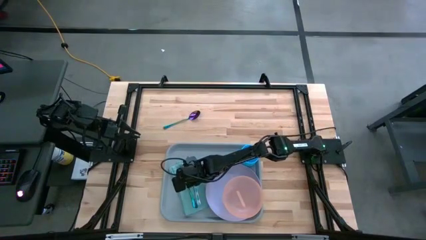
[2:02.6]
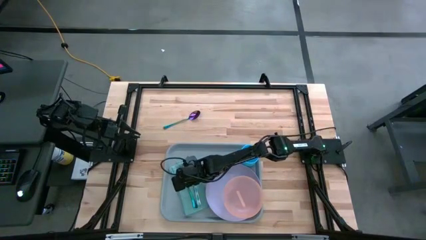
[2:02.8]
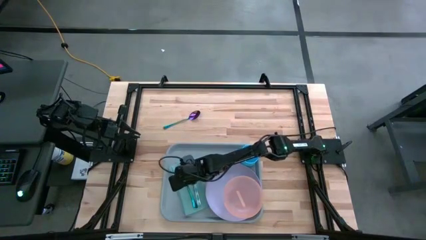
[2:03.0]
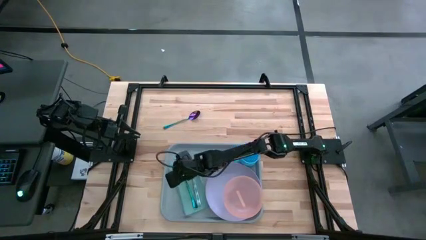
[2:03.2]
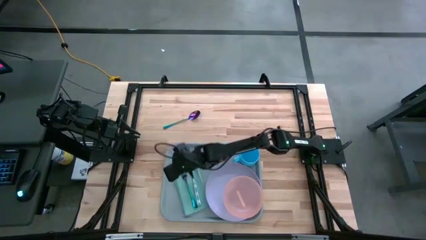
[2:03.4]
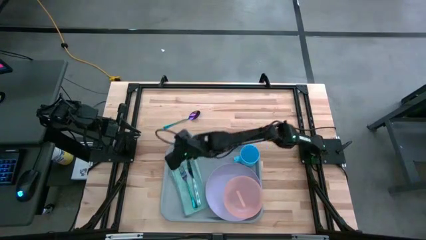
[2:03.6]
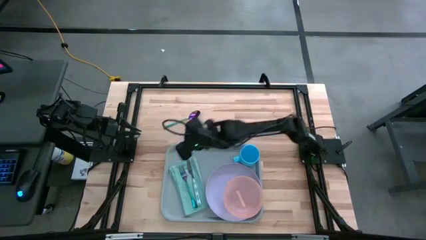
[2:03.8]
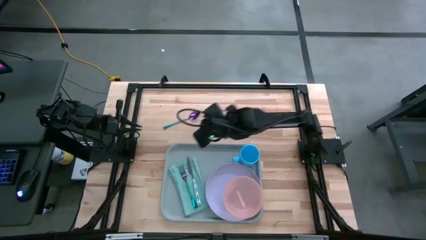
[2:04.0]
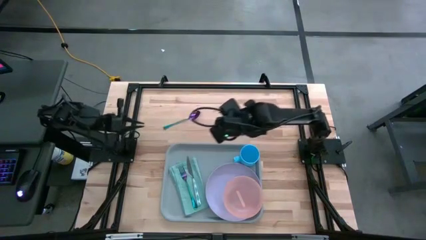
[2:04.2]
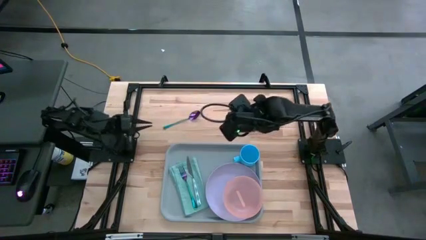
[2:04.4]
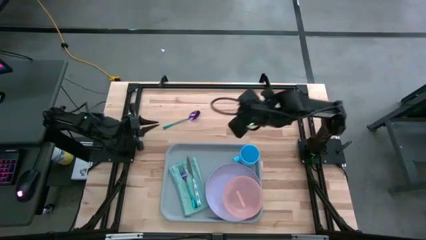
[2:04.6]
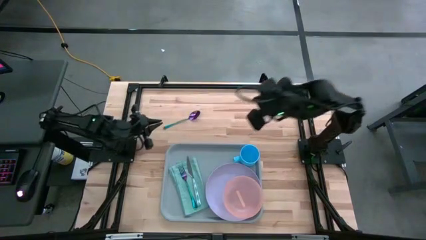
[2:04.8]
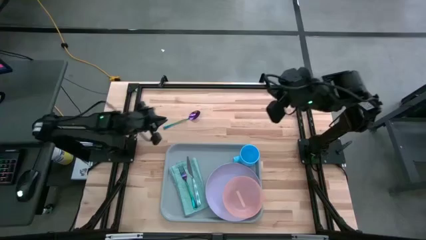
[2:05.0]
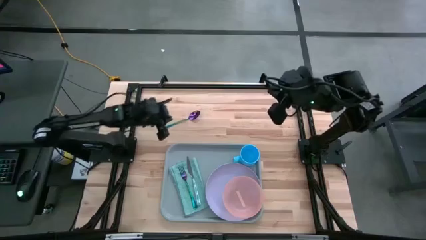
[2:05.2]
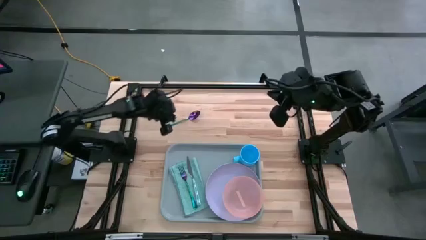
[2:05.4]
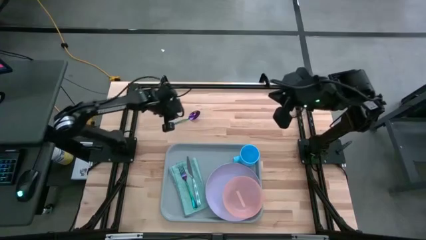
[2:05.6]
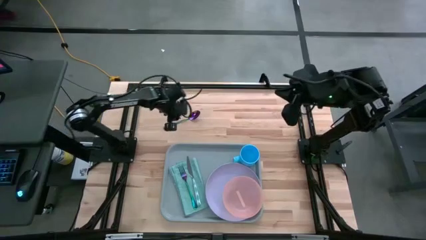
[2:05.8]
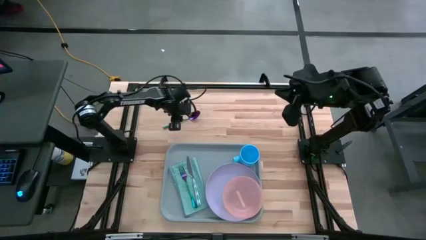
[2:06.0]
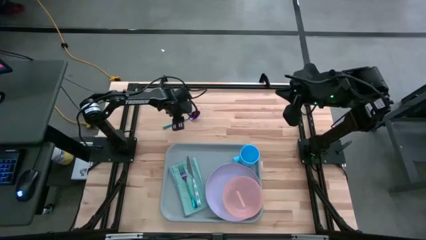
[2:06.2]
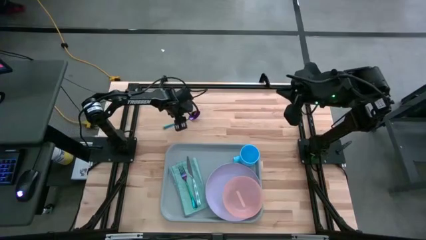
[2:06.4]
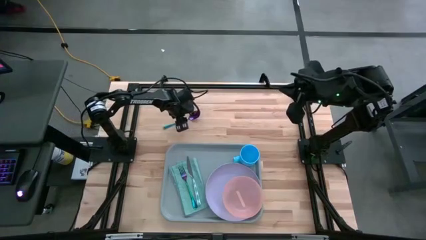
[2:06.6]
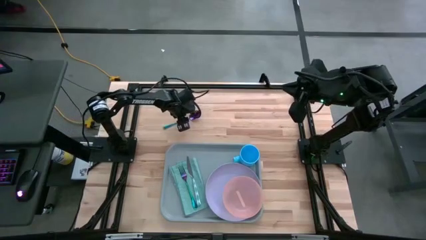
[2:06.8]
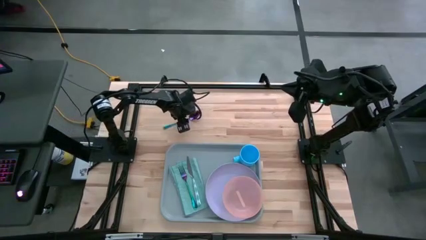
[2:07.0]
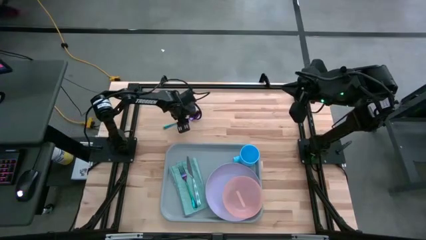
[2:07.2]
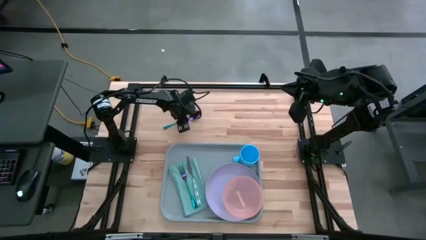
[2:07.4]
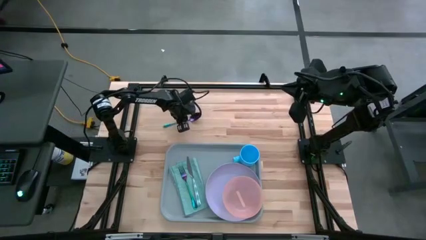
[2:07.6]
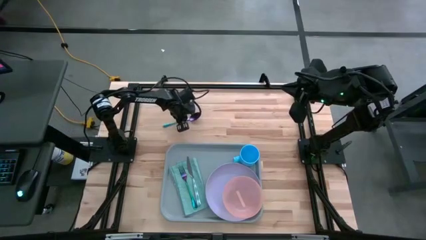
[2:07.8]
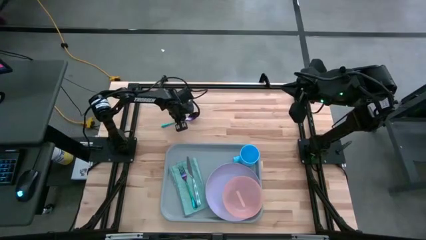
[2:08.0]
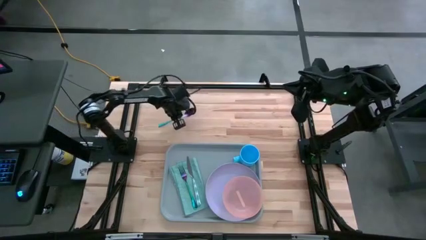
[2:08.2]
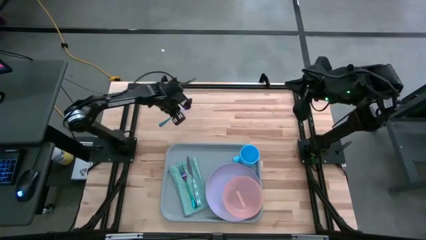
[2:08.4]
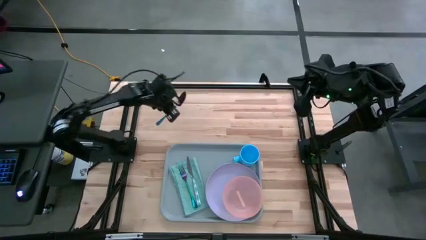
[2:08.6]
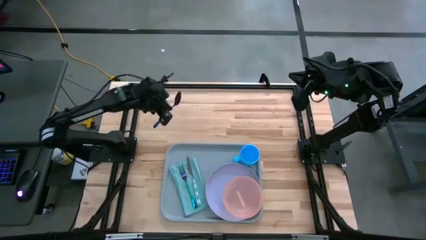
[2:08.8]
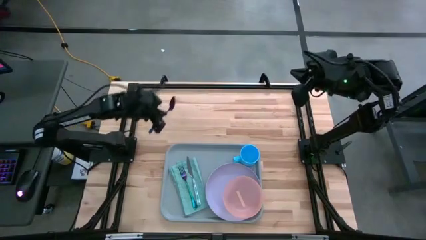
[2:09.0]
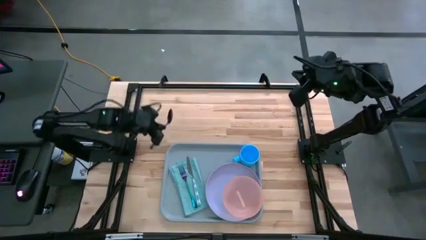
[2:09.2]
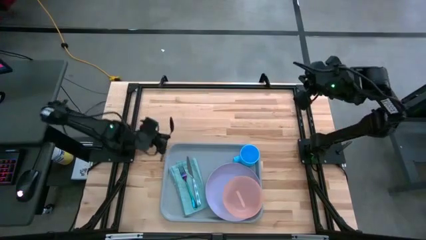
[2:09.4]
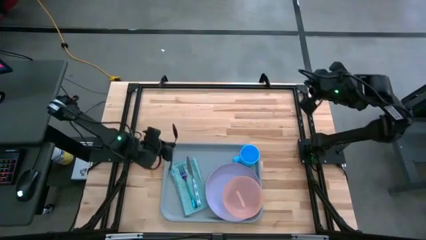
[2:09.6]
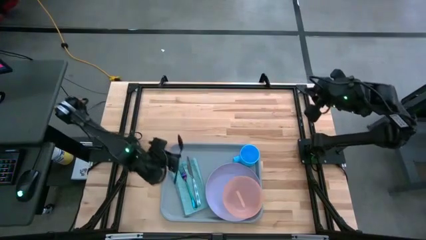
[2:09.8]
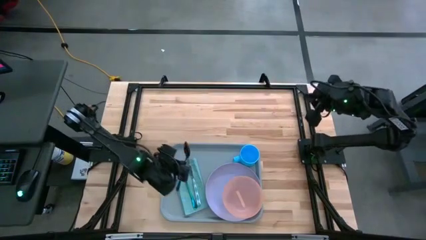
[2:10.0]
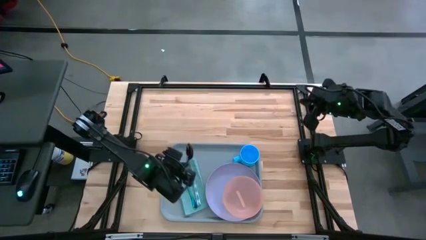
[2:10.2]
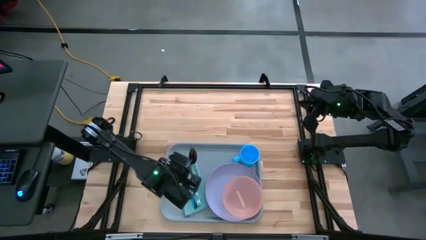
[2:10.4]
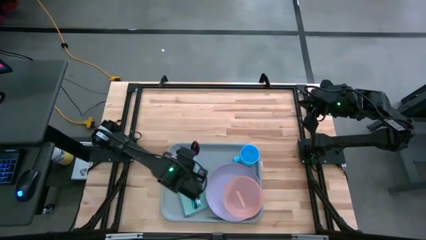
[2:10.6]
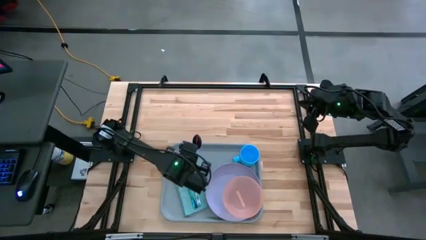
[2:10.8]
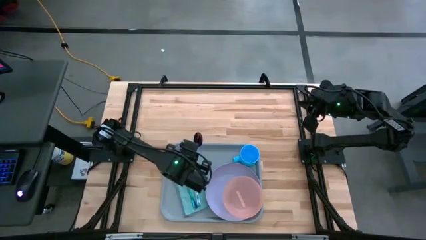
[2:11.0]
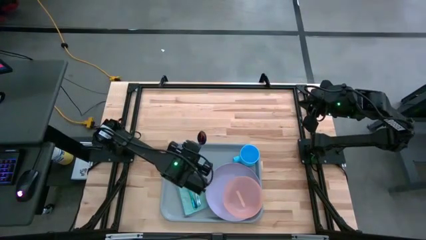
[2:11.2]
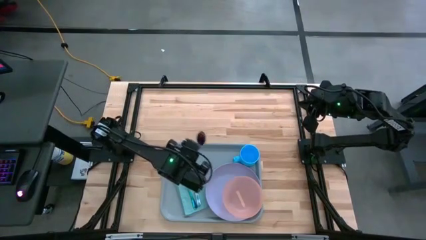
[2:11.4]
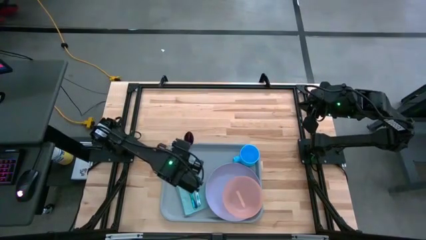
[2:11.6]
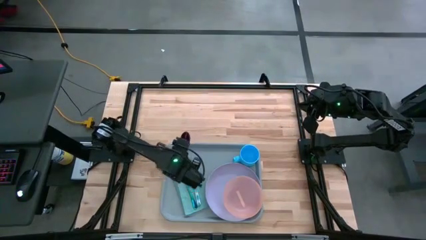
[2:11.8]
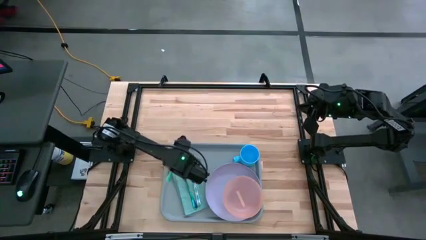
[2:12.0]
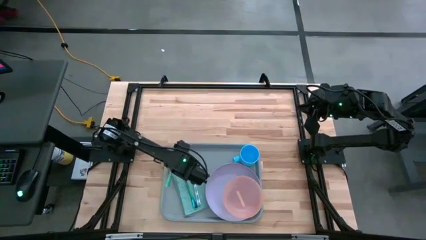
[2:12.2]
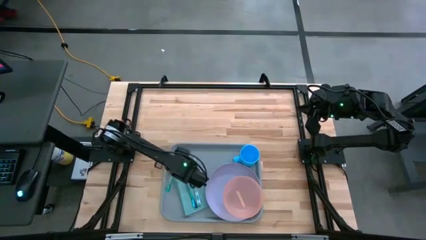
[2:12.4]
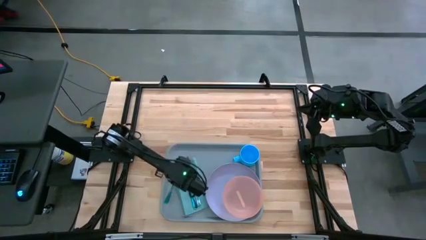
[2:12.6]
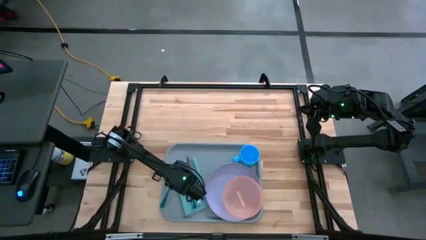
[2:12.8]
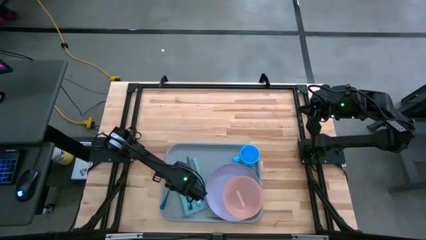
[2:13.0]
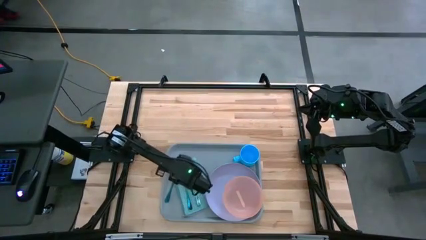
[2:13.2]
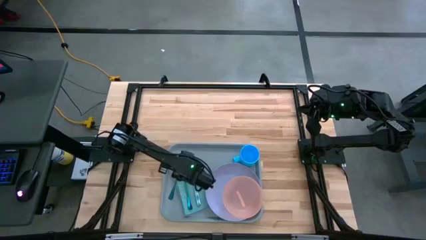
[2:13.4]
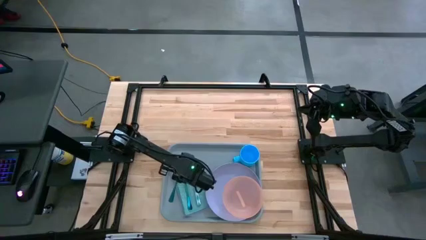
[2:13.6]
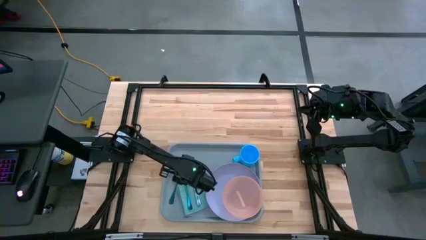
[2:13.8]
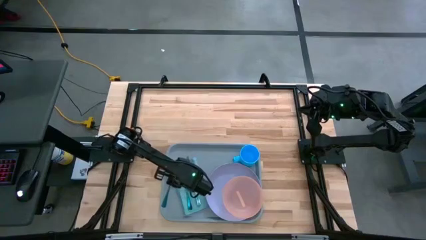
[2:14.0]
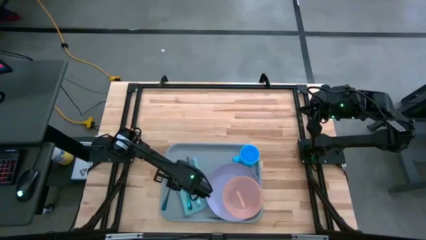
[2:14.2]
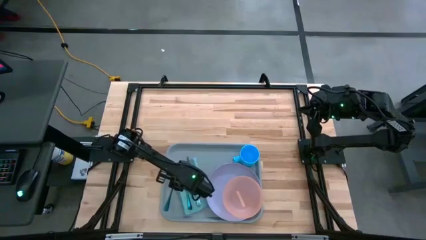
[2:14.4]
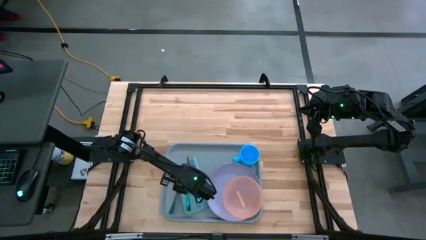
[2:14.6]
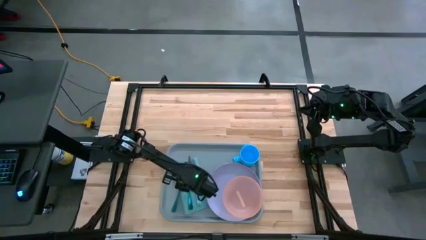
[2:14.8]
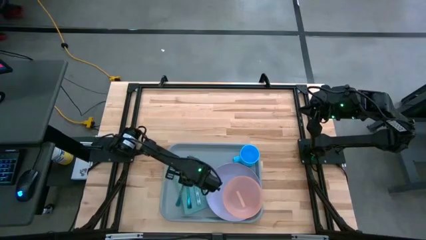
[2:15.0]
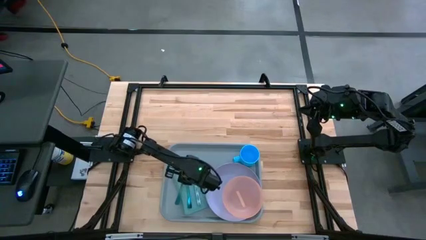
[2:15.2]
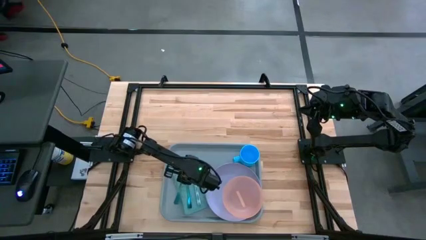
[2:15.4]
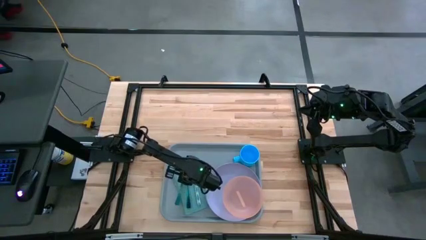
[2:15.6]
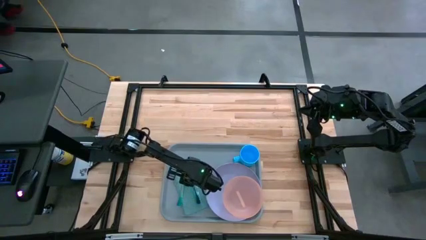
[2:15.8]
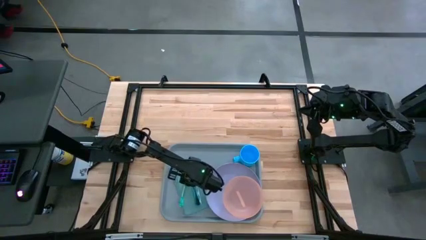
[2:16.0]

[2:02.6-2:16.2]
Task: Set up tray
Put the purple spoon on top of the blue napkin to the left of the purple fork

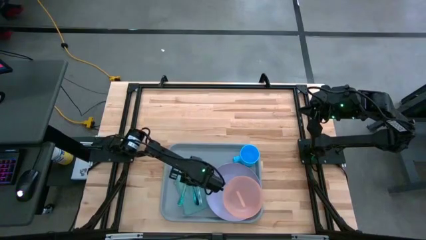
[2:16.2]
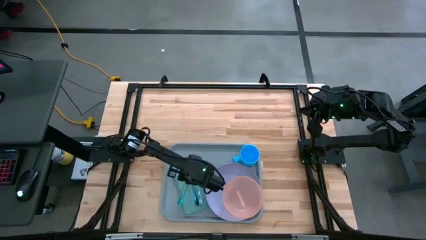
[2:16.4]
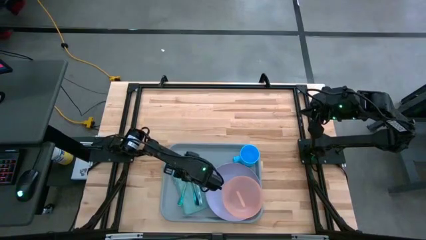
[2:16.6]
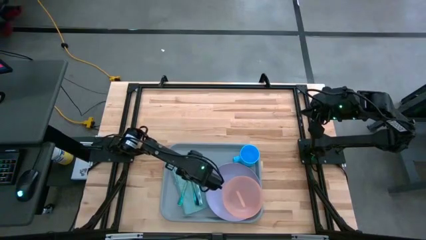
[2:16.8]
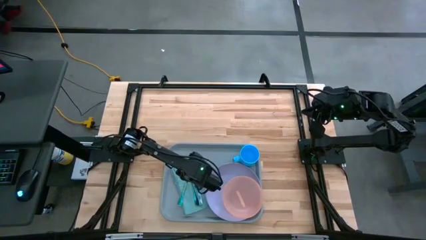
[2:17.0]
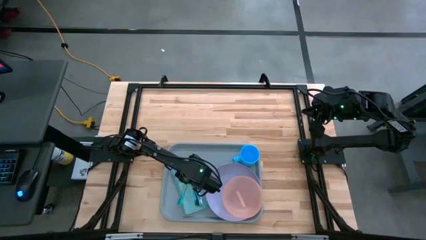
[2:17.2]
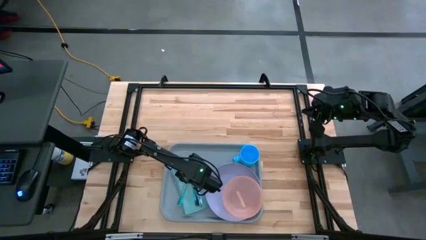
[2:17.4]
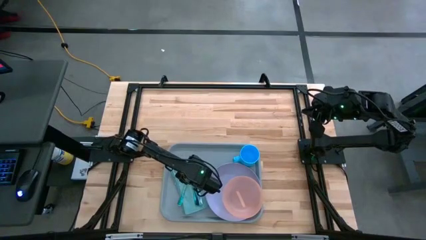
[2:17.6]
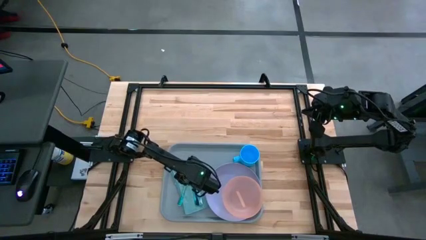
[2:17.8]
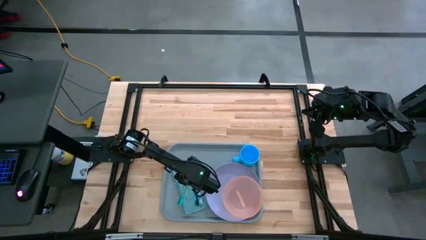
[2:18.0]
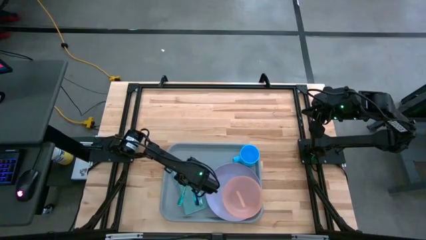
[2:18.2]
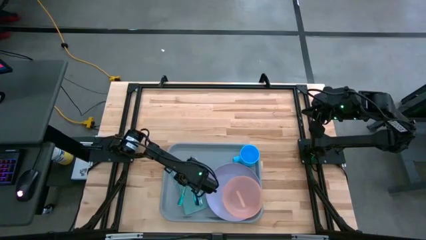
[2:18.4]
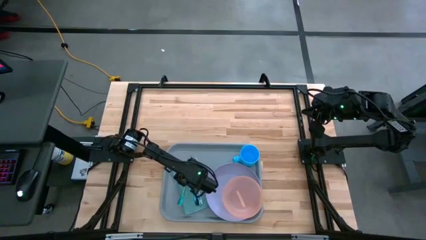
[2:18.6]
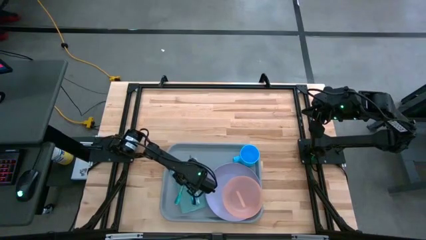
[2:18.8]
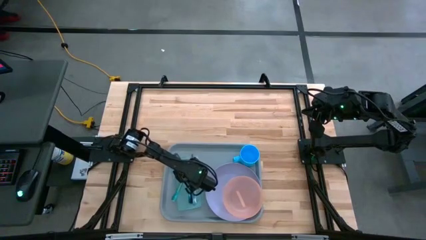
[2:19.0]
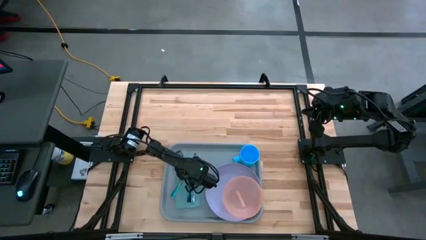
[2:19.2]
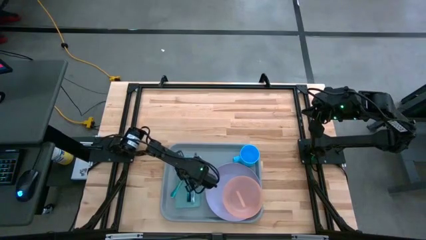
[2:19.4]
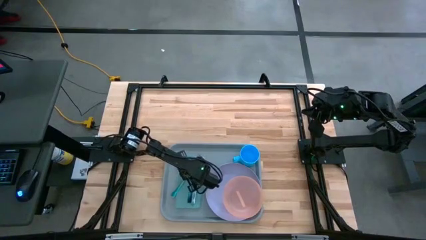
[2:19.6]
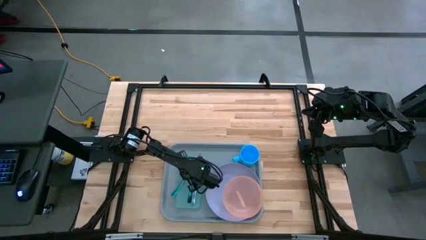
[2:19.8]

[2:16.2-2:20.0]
Adjust the blue napkin
